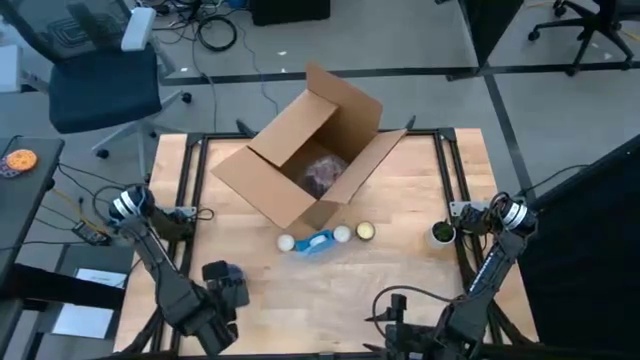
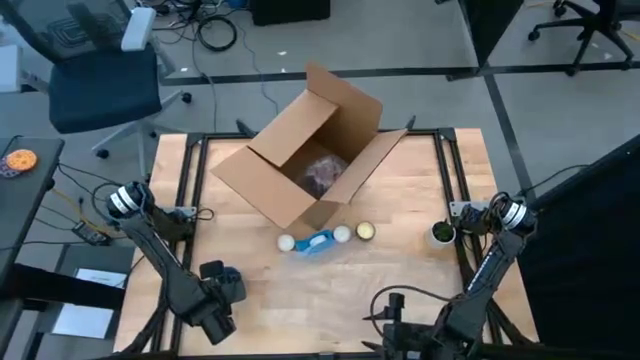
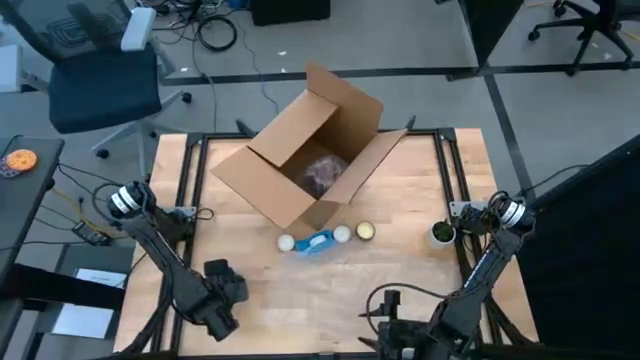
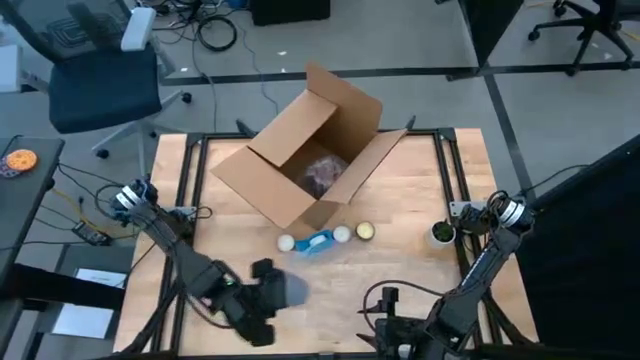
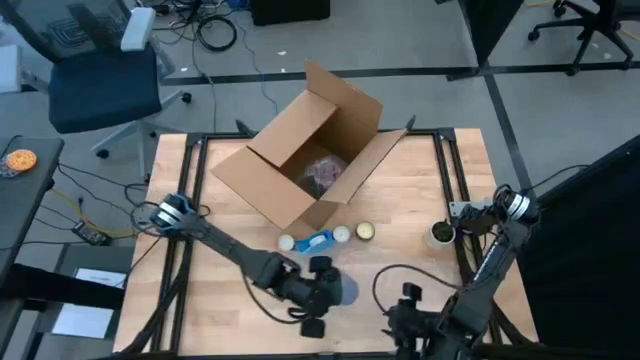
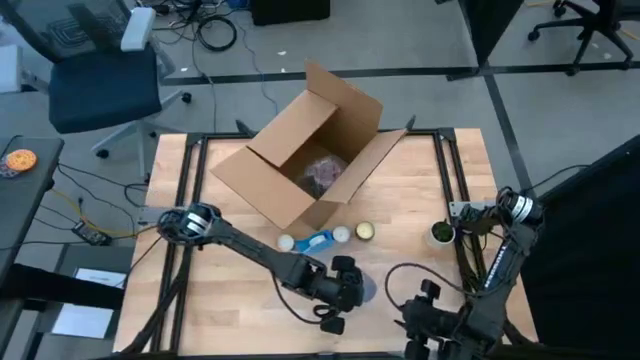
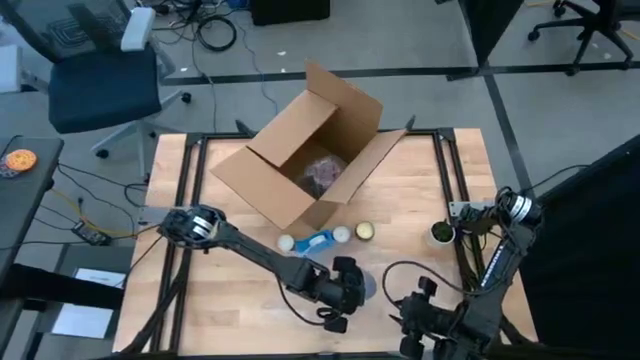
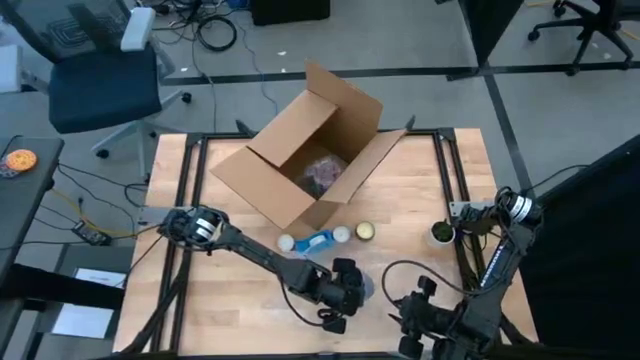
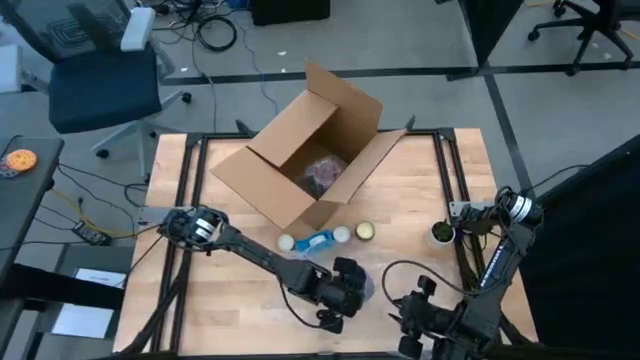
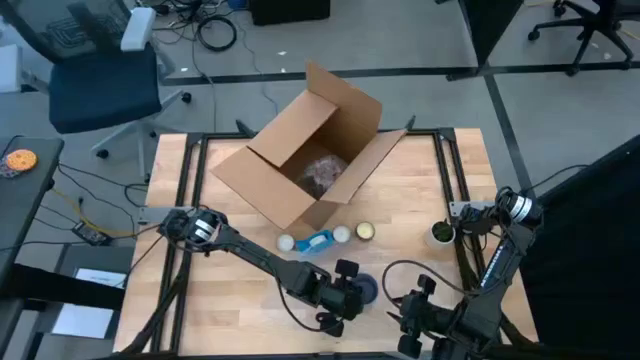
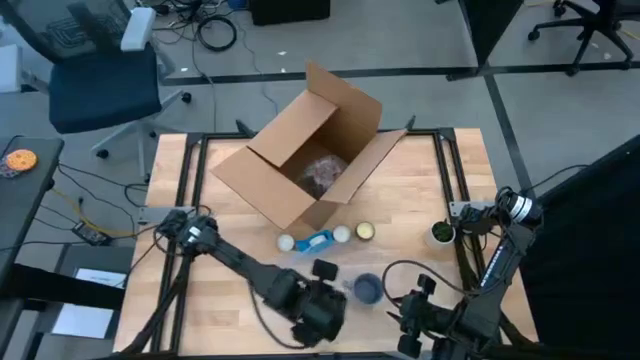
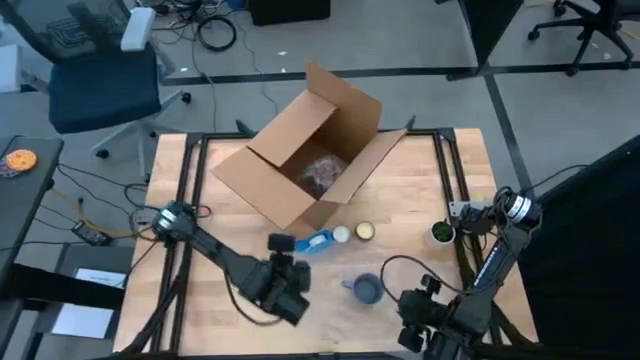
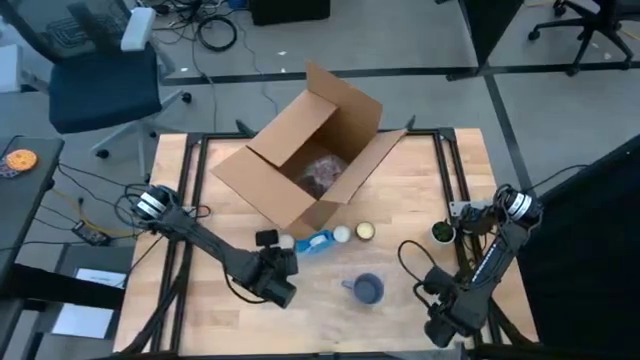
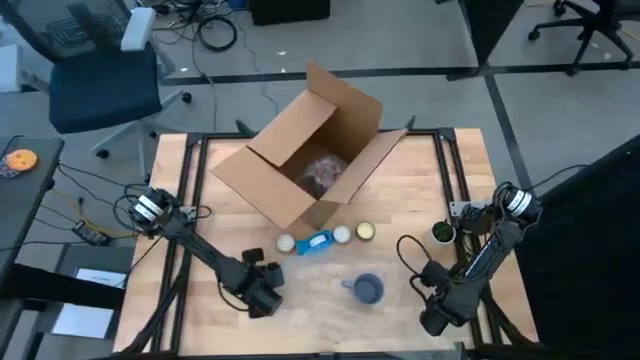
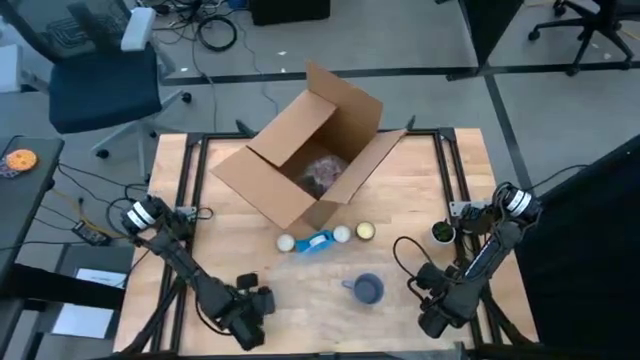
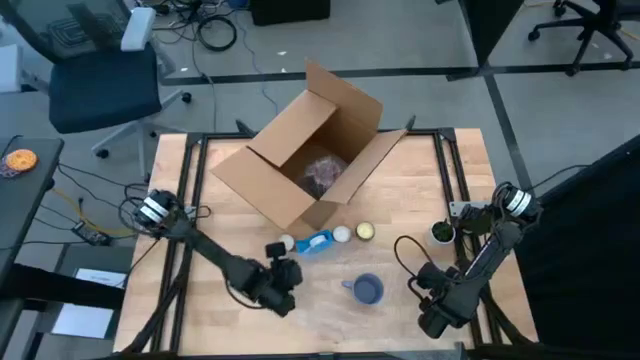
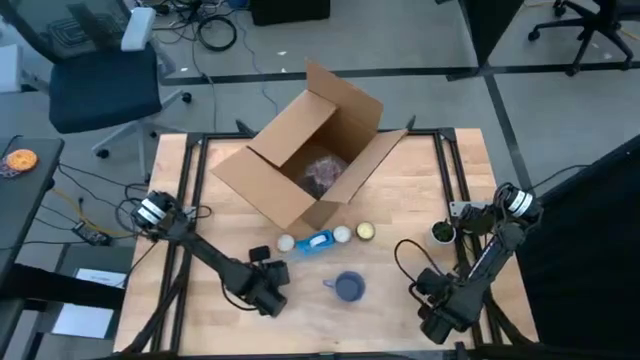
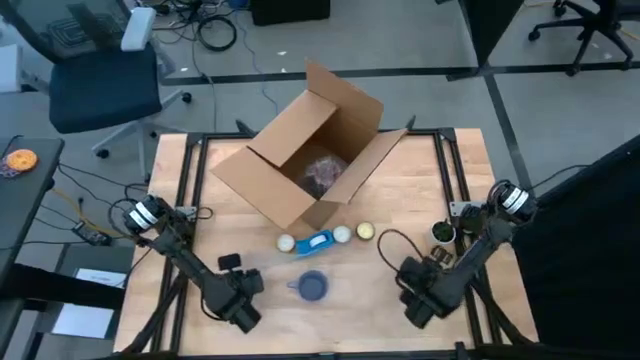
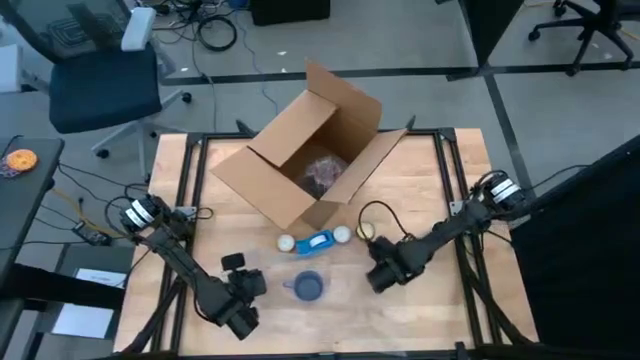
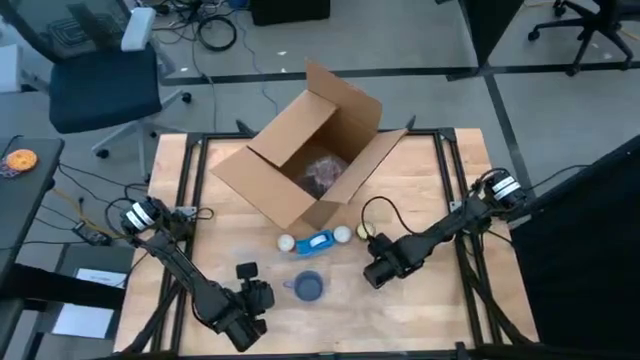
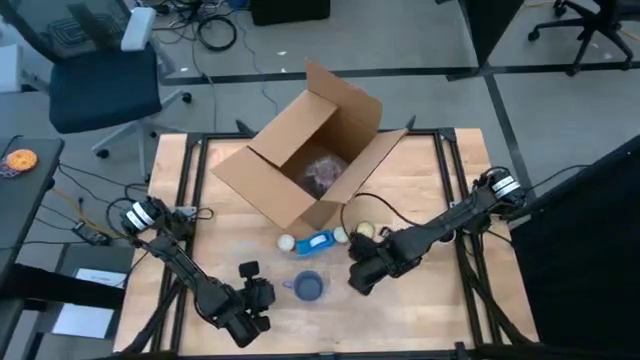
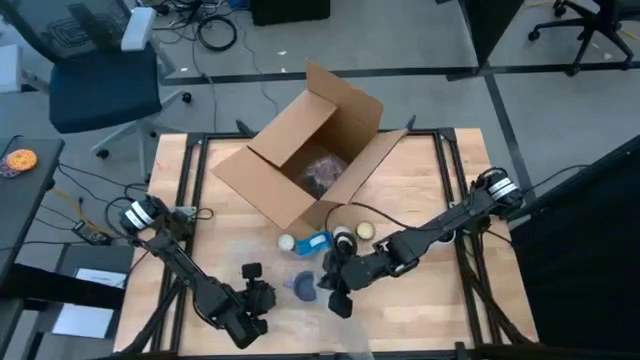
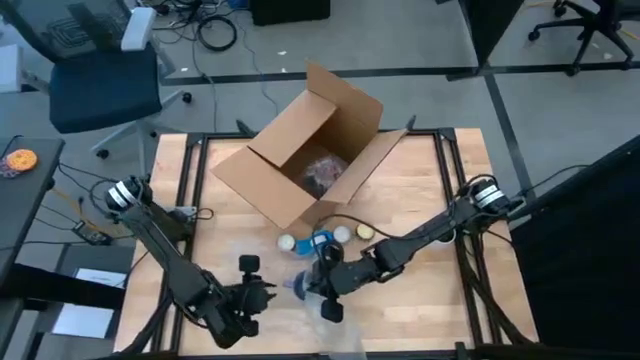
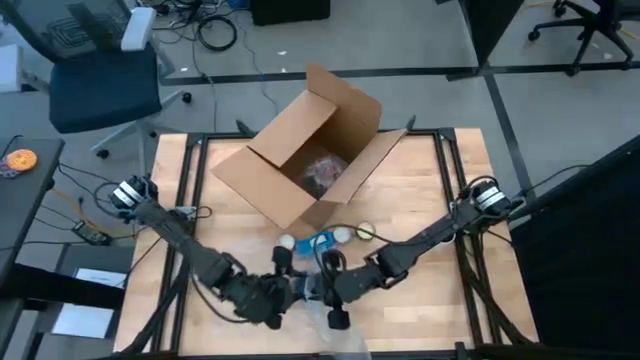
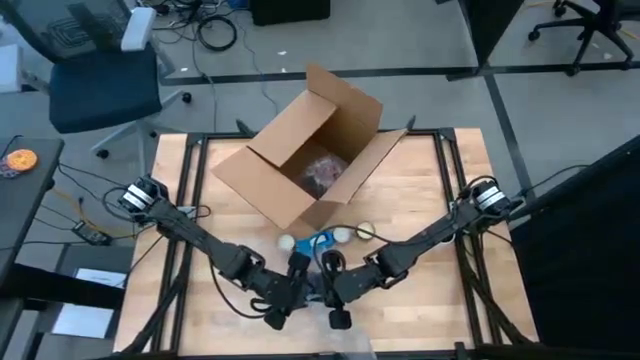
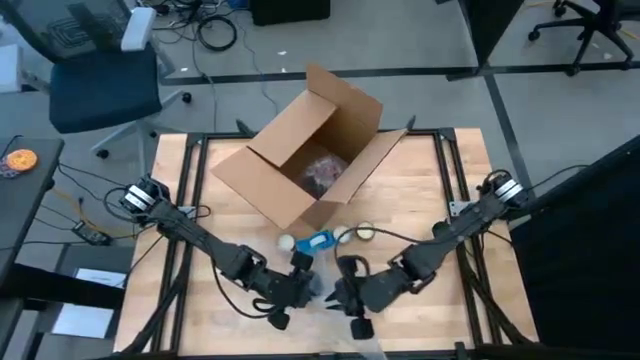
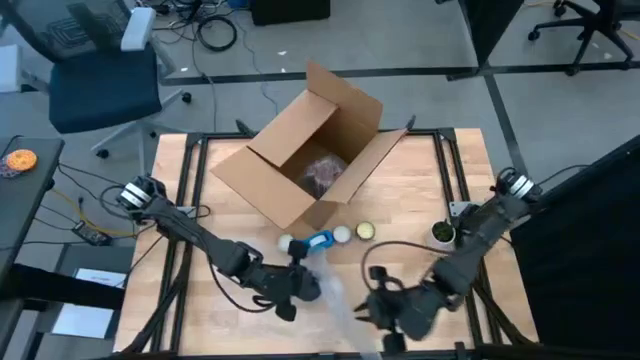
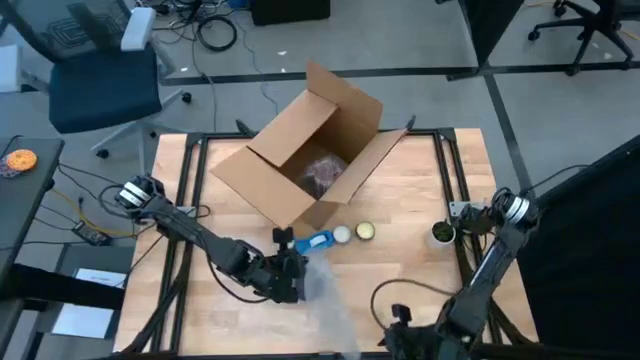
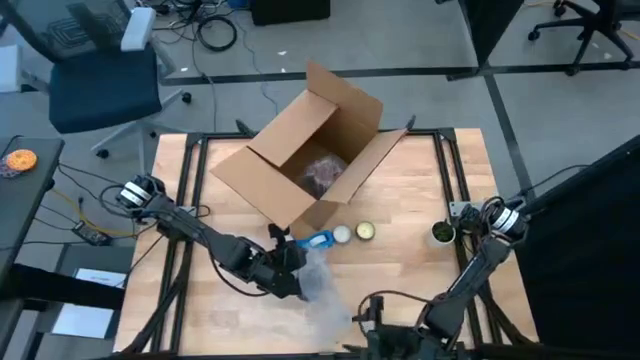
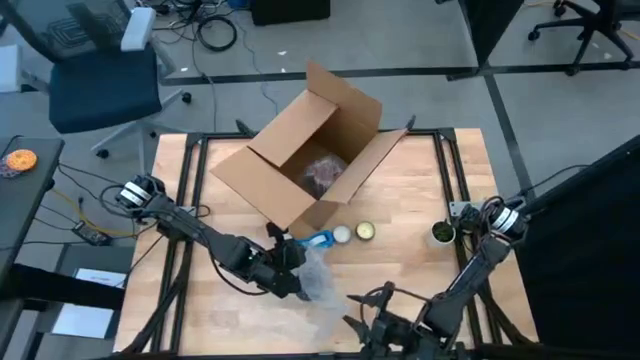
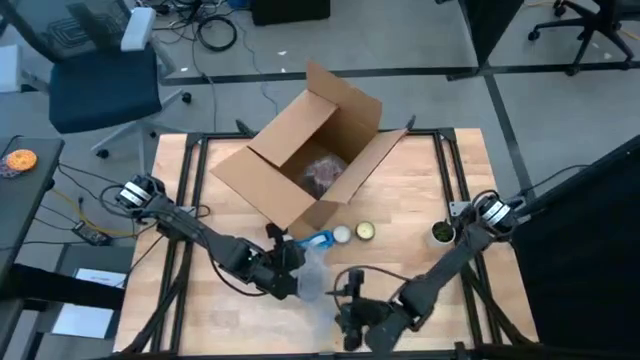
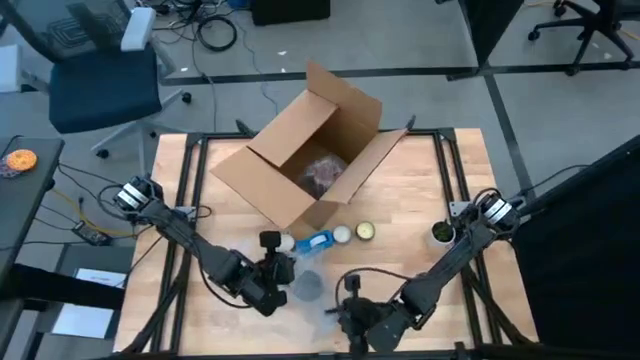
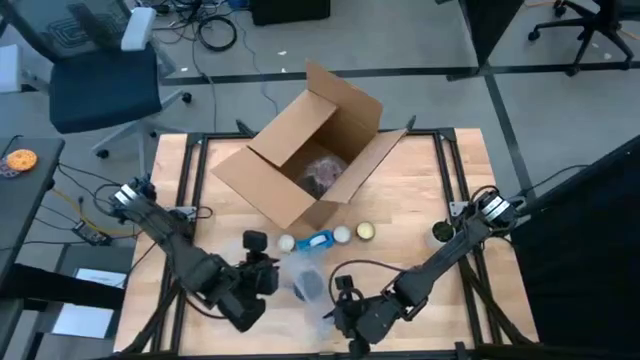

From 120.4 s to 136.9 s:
Task: wrap mug
Wrap the purple mug with the bubble wrap

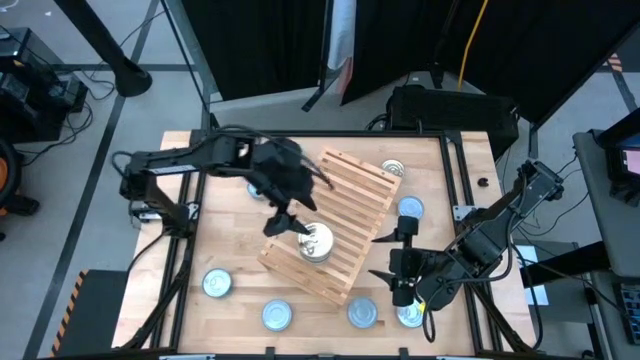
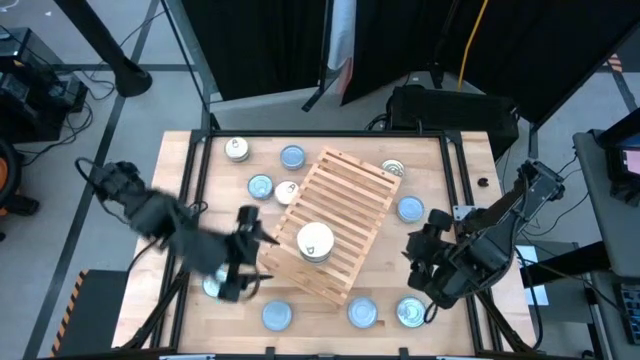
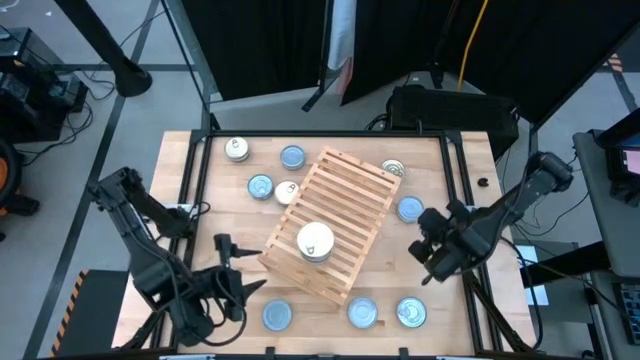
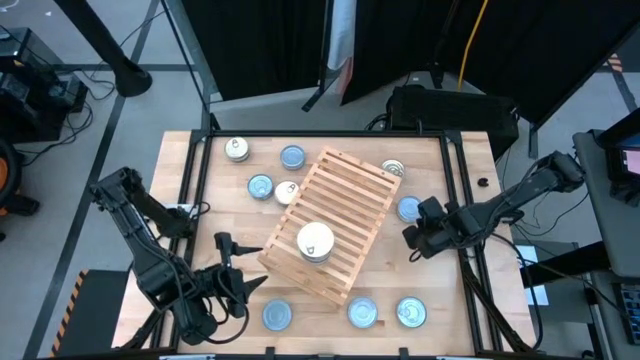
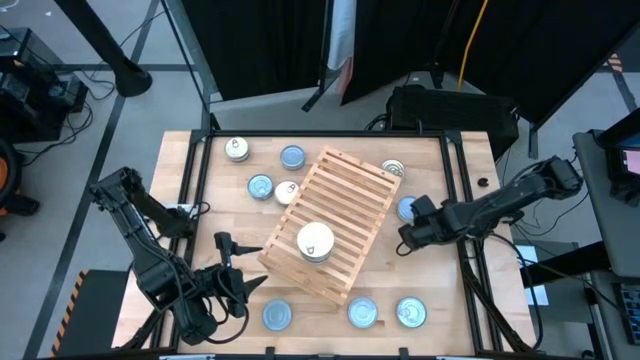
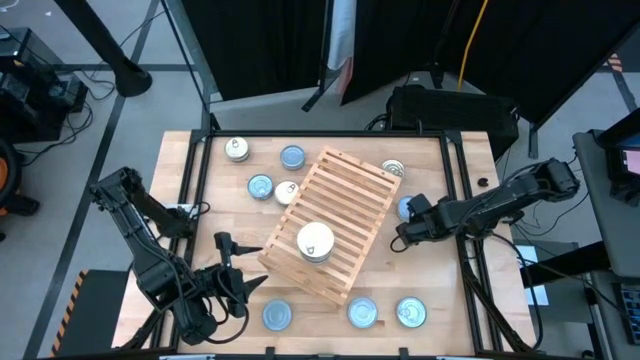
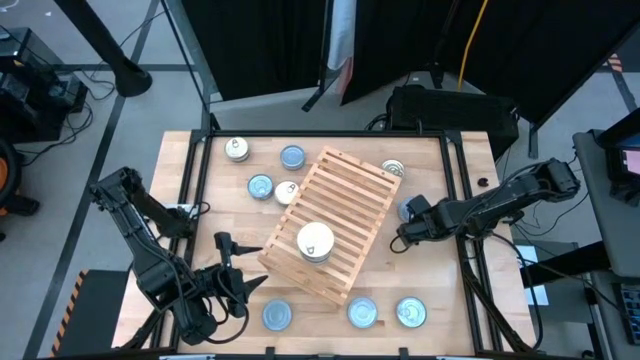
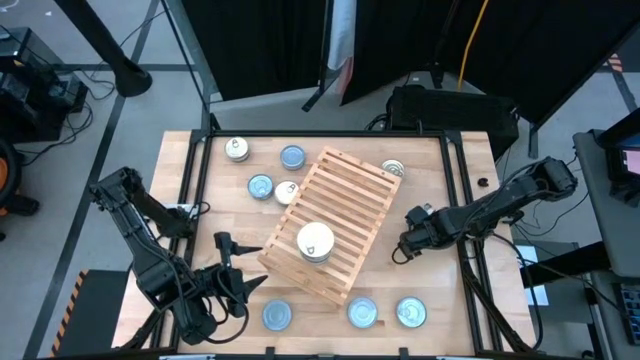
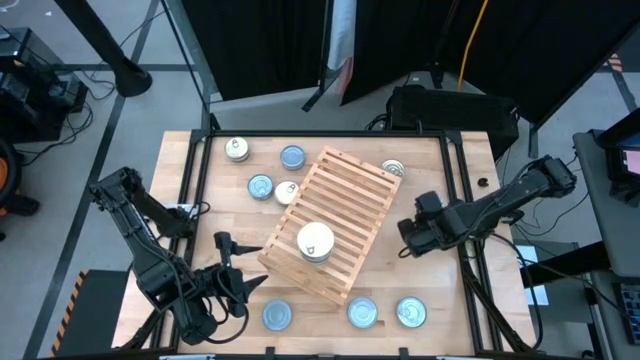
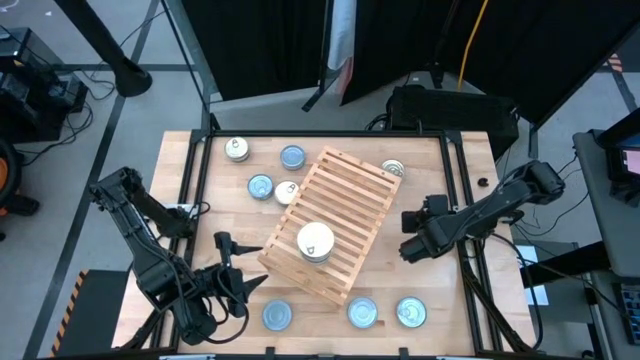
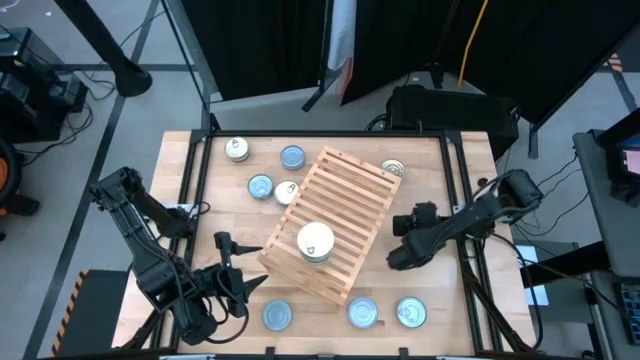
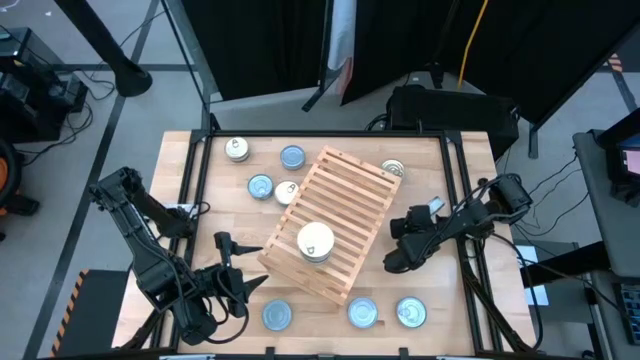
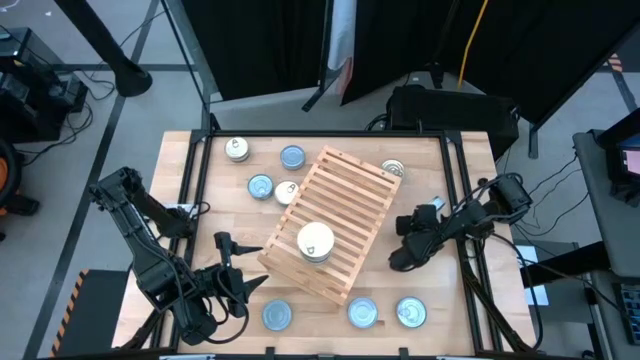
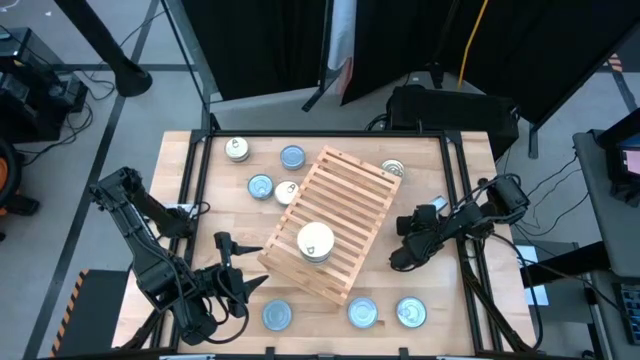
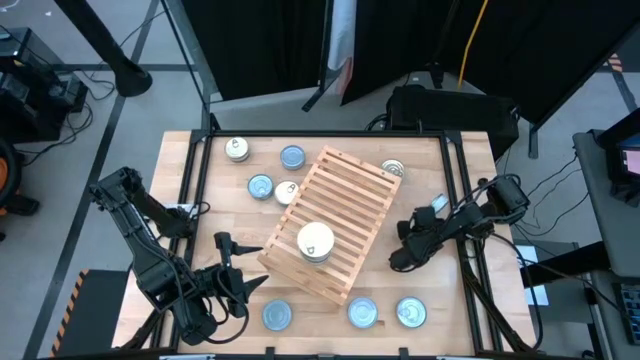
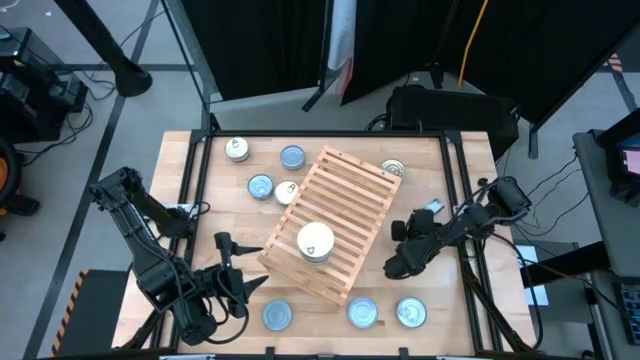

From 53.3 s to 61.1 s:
Task: Stack canned seafood by type on shelf
Put the green tuna can on the shelf
